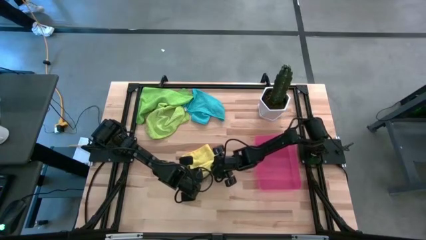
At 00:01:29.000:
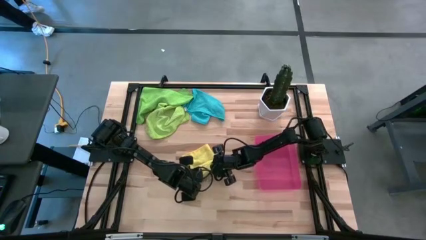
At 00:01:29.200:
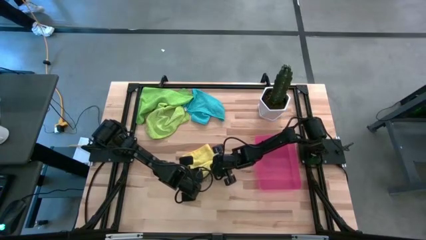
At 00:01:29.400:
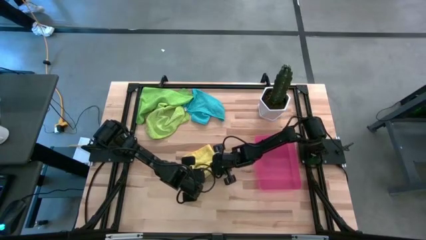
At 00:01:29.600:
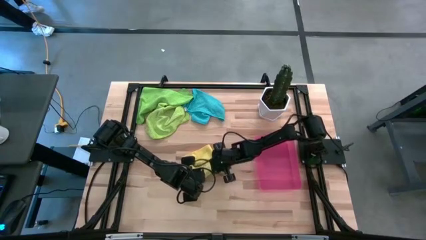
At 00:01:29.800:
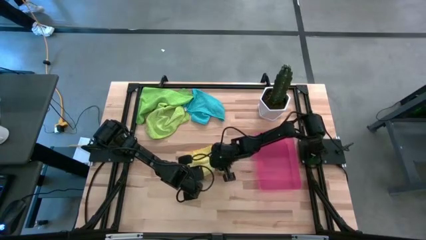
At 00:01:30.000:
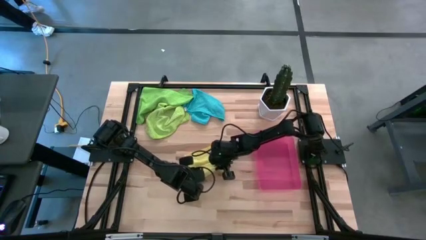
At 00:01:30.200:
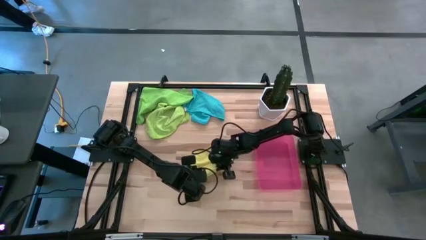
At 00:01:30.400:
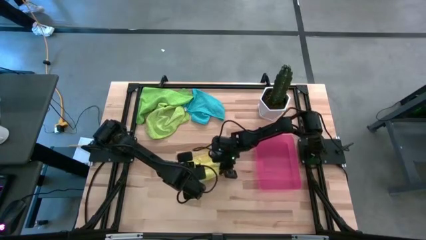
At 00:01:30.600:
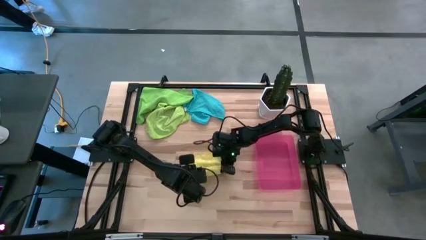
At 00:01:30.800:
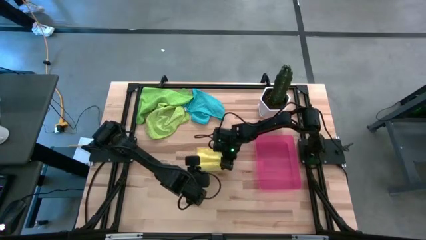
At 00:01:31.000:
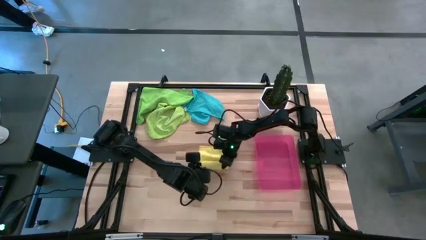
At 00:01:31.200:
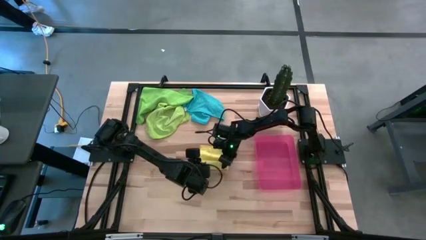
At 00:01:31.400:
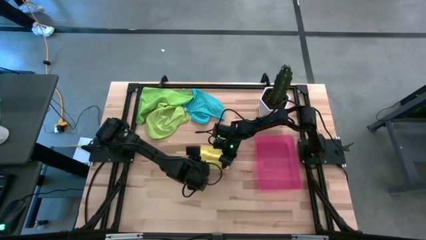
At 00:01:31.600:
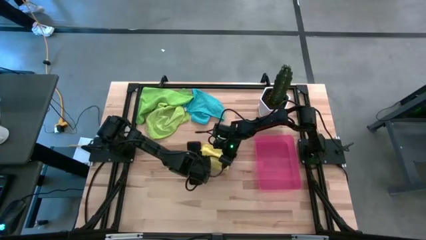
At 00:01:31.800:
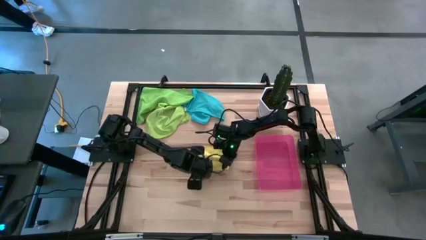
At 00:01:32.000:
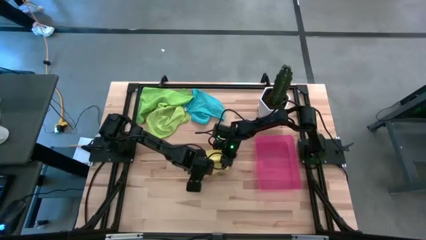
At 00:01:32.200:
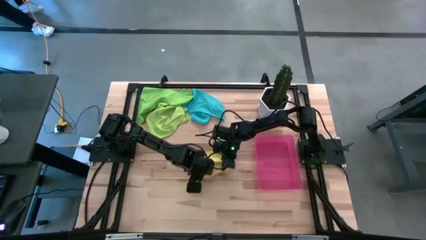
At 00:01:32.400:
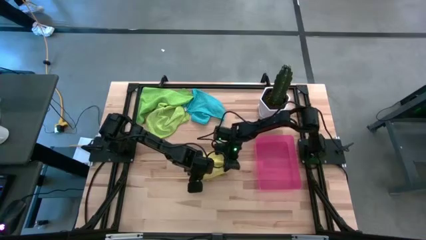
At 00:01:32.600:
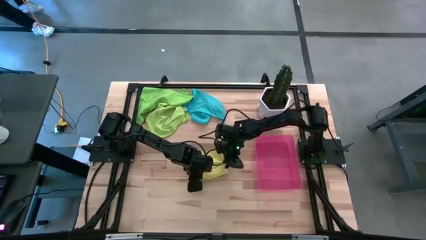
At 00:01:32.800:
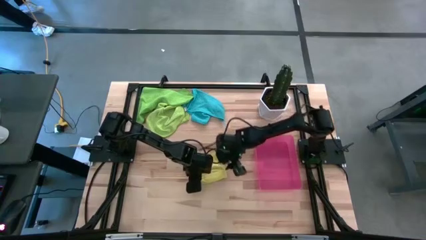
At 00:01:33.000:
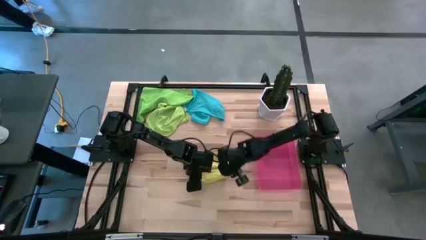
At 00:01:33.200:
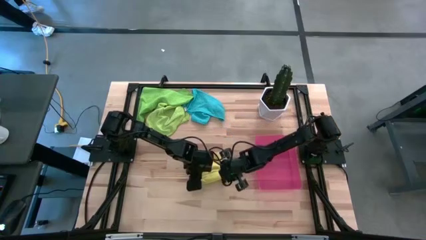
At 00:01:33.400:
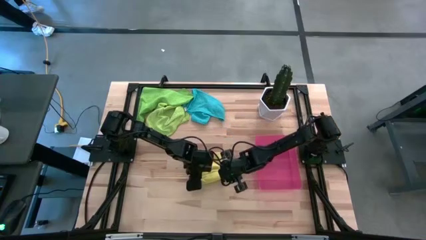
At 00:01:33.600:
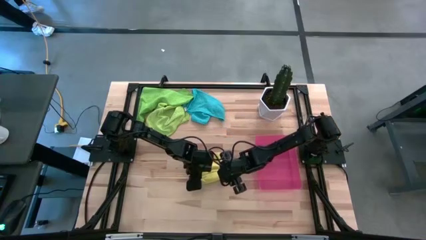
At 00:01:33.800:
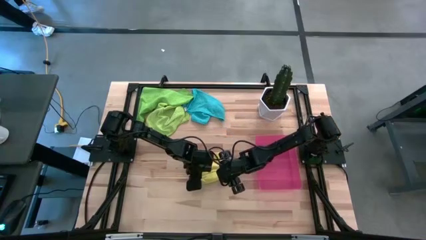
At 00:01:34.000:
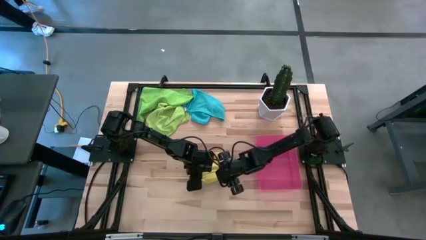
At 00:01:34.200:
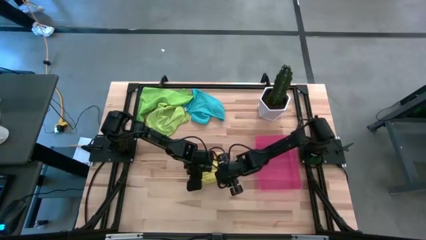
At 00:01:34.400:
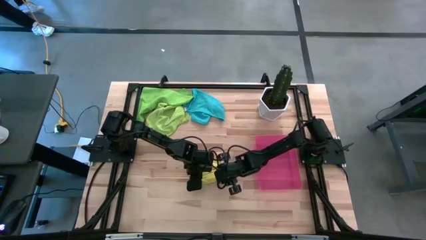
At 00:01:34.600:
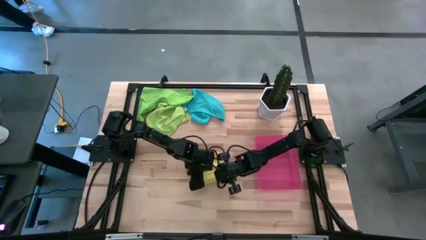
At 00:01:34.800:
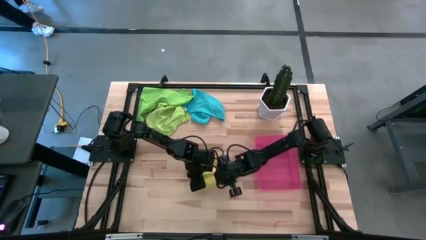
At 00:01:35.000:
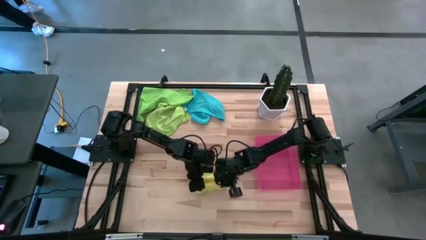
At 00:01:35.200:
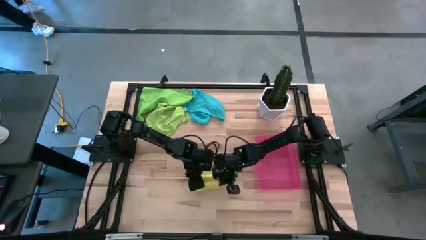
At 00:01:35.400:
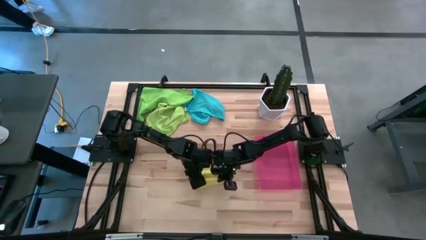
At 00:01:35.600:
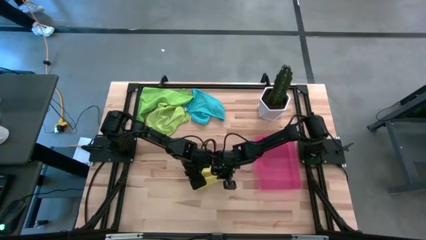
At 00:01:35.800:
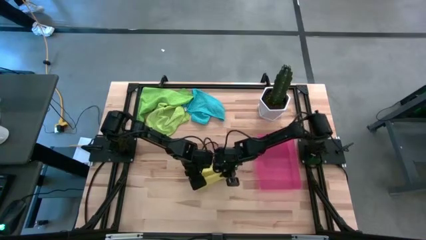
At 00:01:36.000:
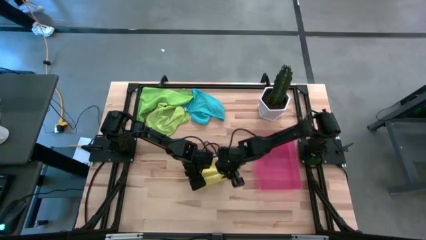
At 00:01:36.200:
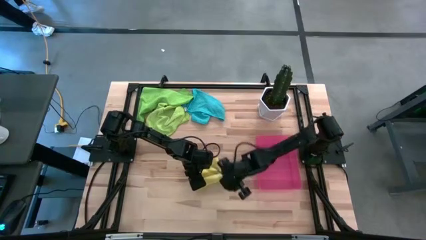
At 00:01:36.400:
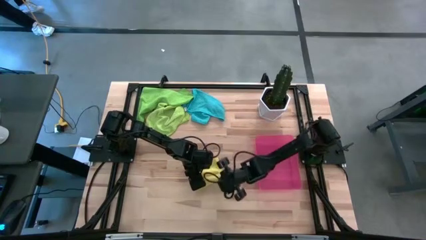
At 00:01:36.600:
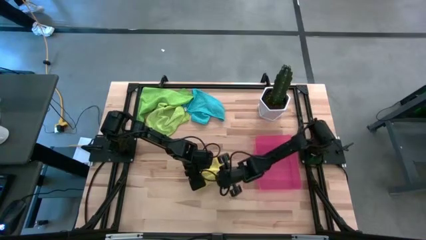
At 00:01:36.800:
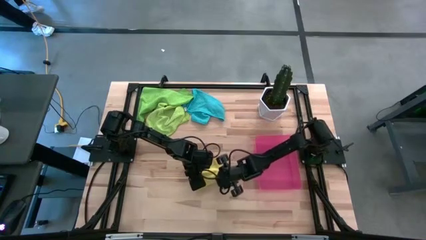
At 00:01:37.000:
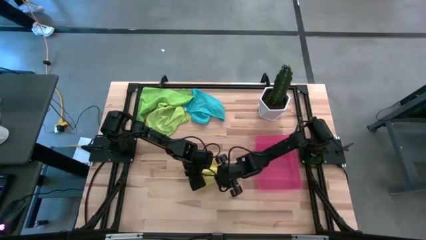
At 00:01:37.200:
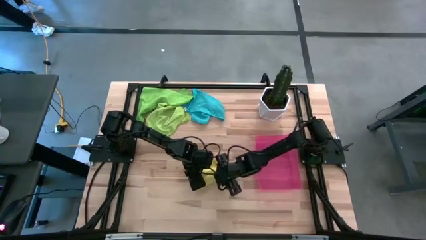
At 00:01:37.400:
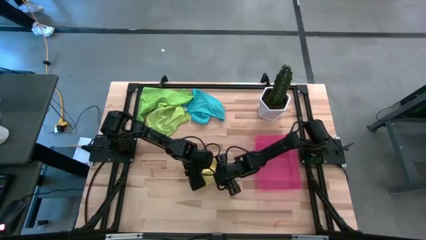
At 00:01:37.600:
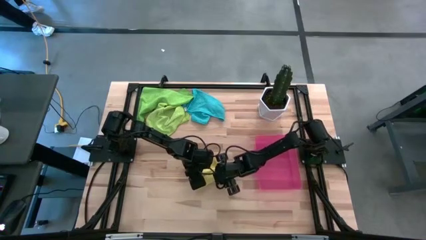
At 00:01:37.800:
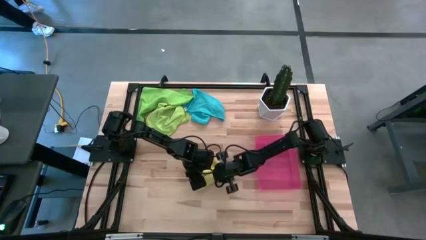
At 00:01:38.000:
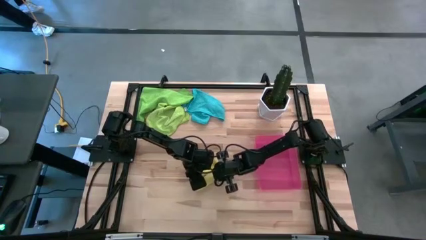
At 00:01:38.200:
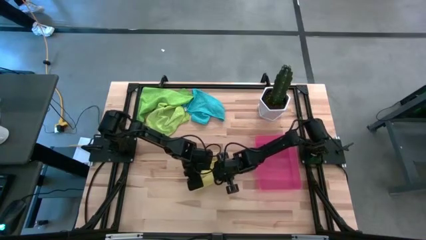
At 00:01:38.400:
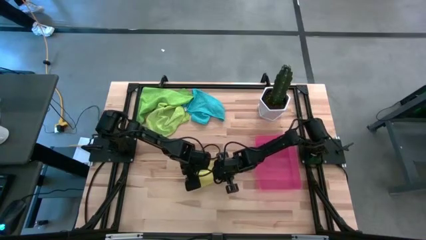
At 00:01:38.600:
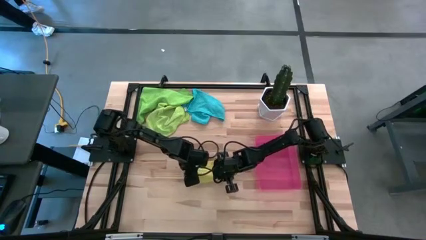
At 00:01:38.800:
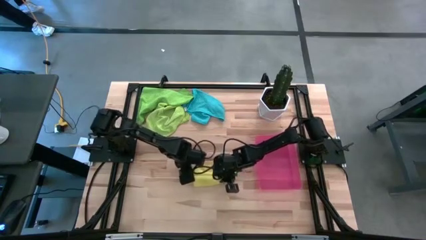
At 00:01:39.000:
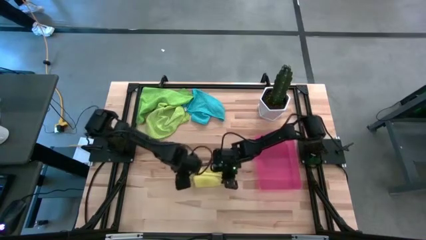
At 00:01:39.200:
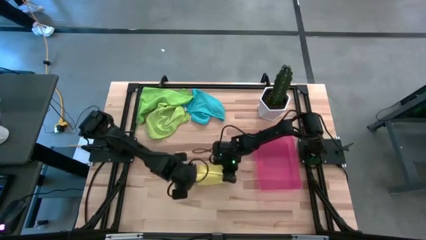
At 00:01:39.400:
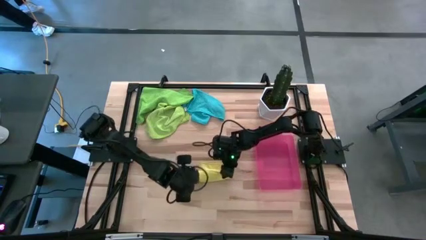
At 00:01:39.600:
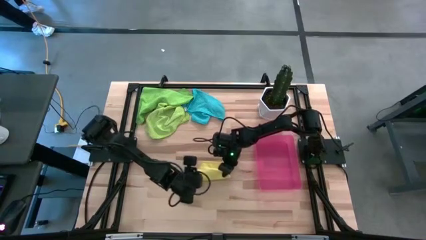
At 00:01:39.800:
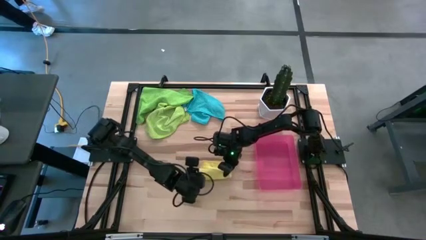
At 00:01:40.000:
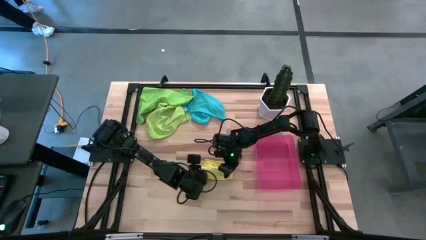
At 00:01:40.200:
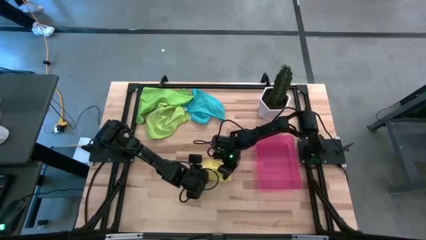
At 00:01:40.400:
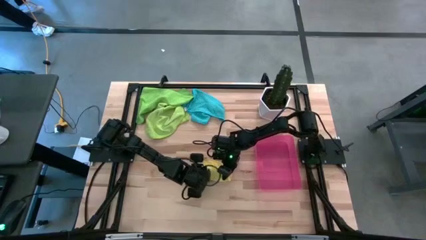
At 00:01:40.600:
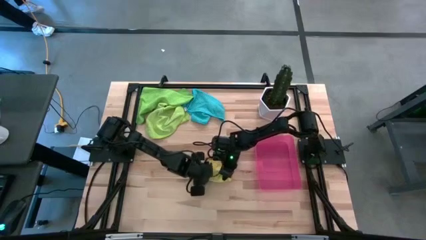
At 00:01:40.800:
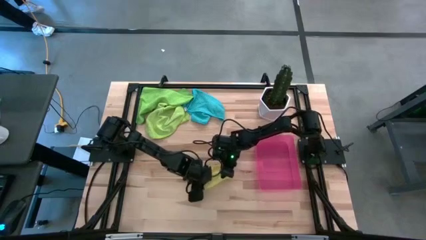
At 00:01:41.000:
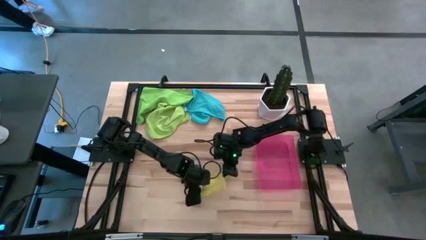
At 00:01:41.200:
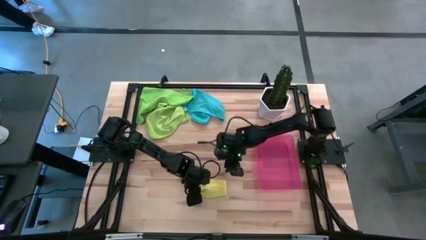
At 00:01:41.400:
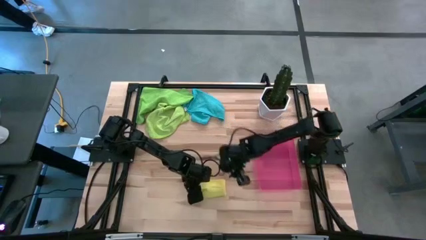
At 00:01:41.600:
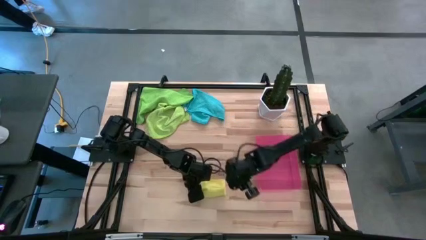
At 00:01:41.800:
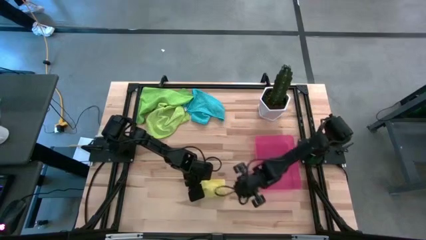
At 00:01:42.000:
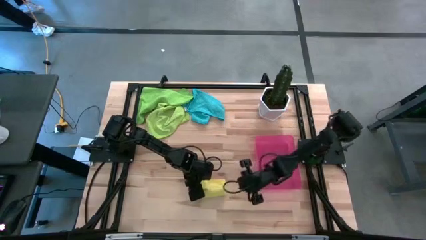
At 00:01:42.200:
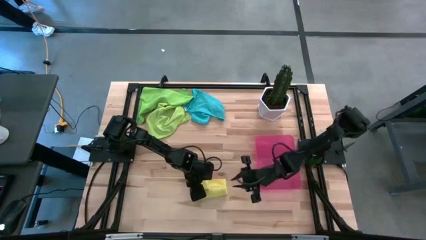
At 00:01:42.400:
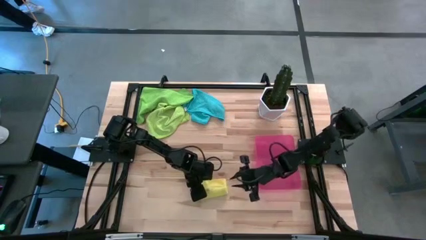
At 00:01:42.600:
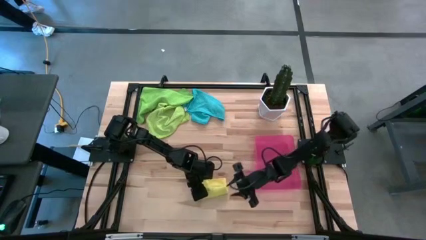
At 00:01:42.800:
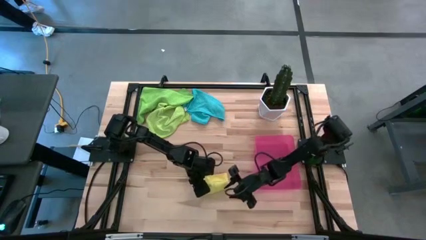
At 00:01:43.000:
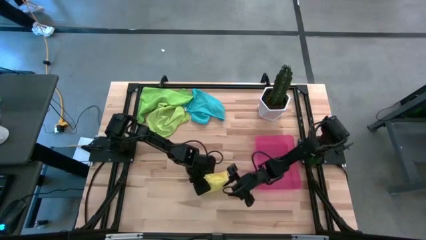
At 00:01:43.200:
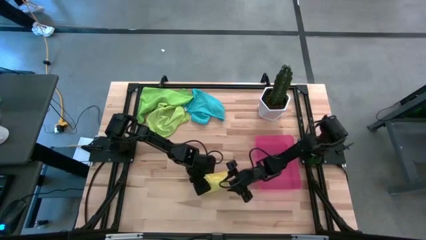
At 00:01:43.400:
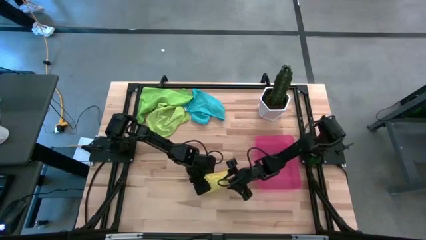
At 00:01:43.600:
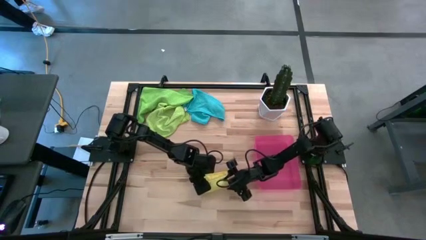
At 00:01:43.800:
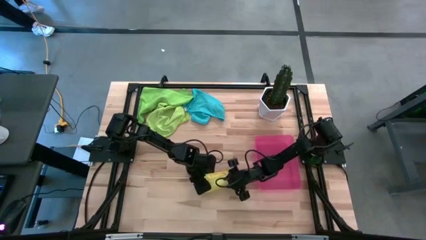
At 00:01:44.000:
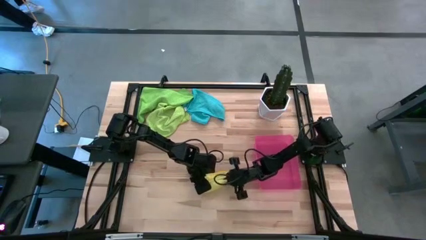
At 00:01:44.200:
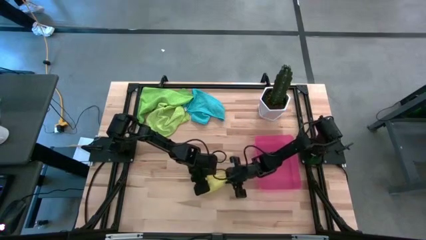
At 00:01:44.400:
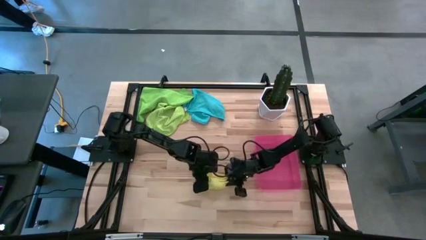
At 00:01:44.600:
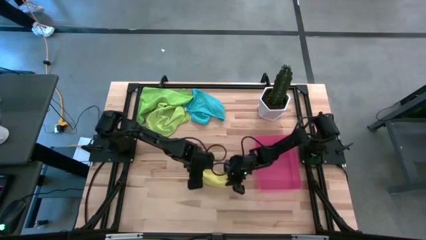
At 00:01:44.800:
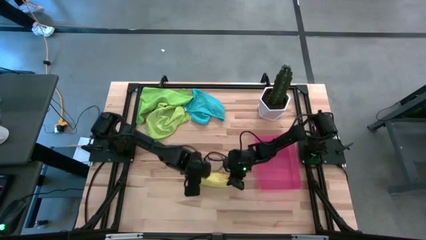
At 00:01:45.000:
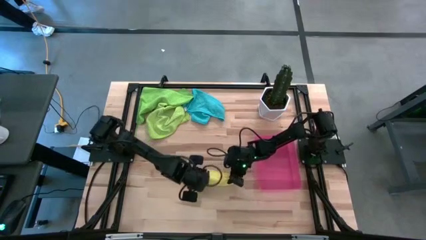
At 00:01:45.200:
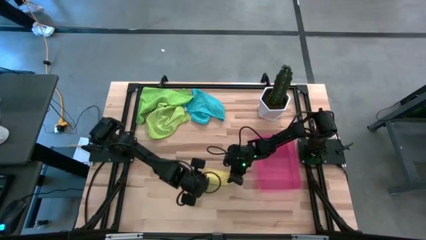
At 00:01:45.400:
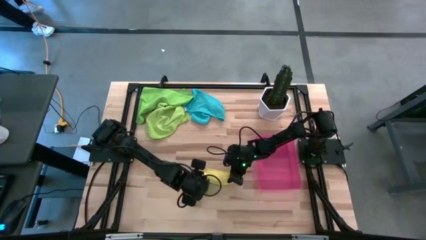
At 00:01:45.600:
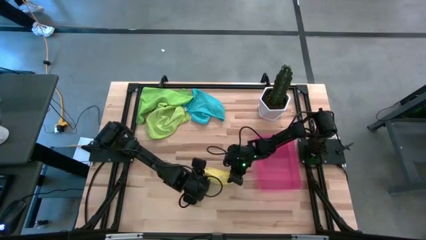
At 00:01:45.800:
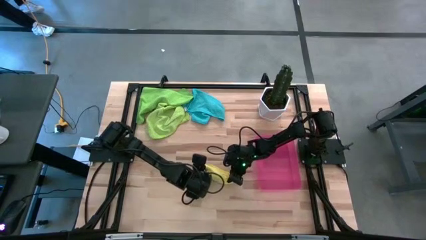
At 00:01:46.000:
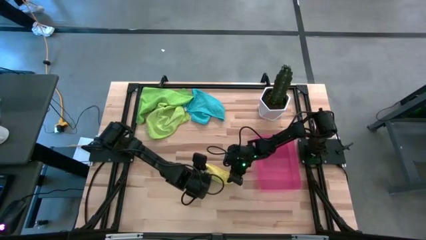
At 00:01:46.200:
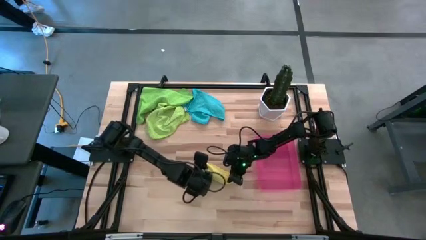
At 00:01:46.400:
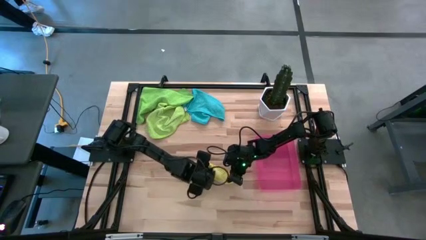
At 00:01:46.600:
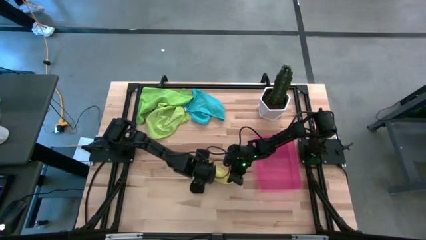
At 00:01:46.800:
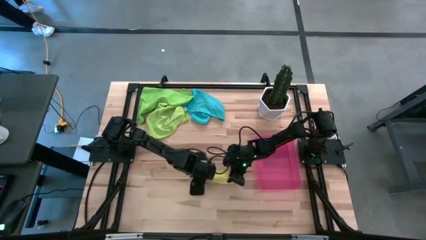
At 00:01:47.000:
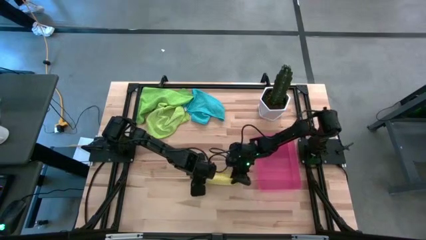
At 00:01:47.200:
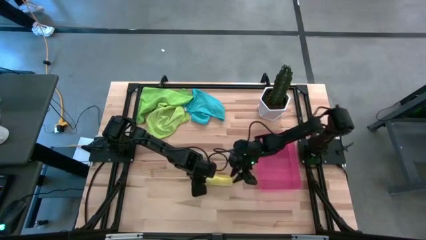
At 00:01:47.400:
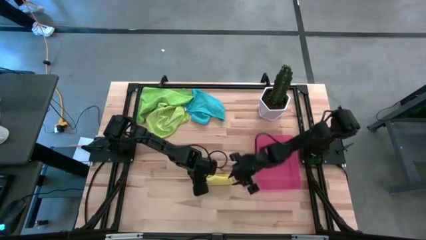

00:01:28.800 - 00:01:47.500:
Task: Roll microfiber towels into tight, uniform cylinder then place into a basket
Roll the yellow microfiber towel
